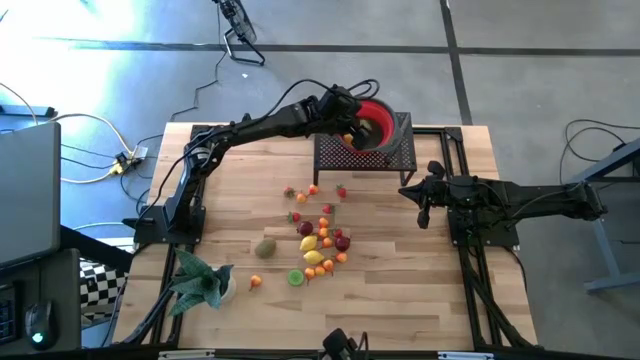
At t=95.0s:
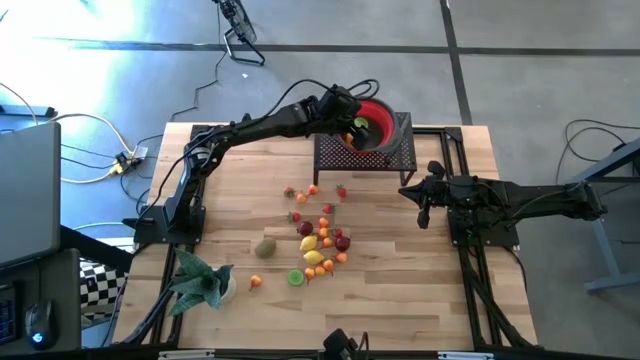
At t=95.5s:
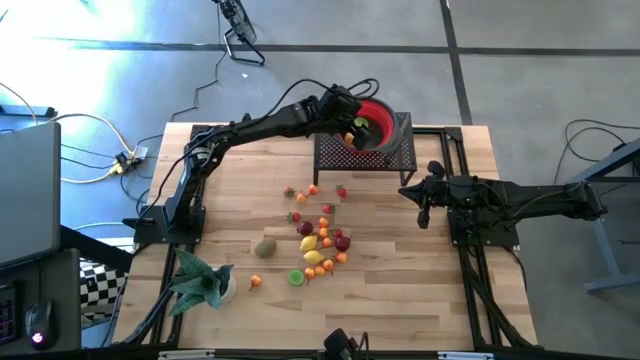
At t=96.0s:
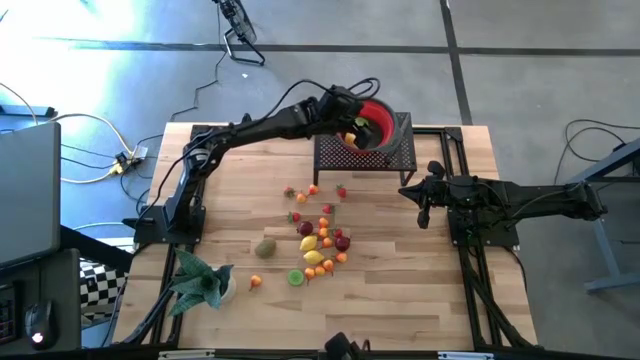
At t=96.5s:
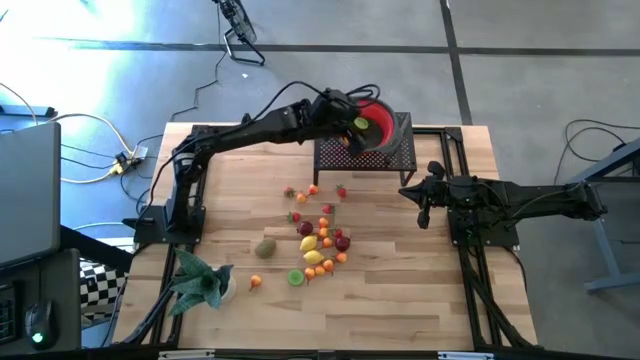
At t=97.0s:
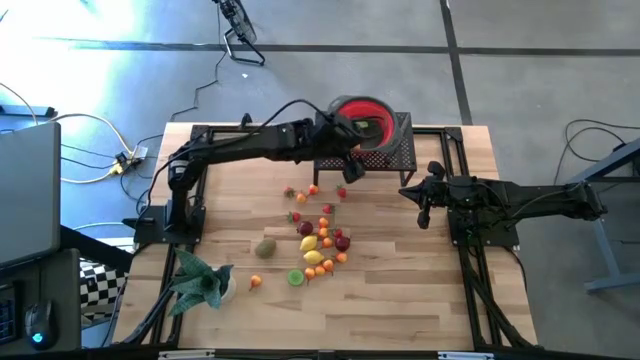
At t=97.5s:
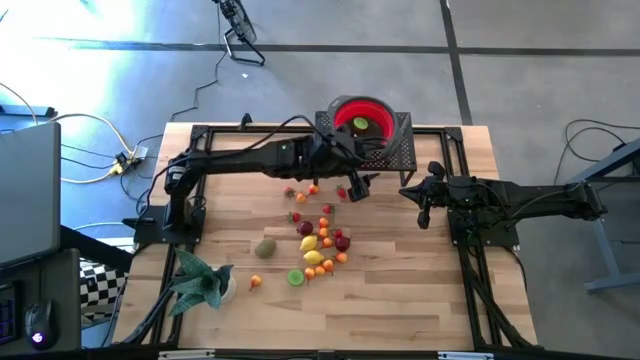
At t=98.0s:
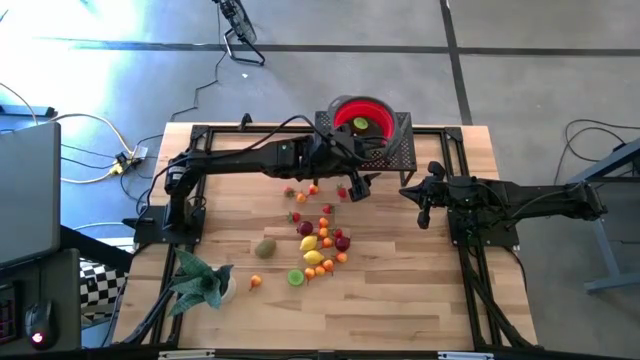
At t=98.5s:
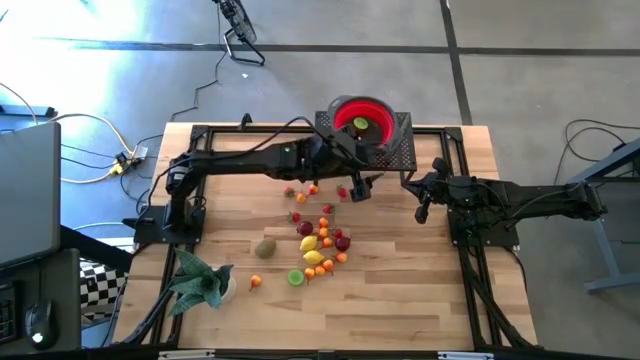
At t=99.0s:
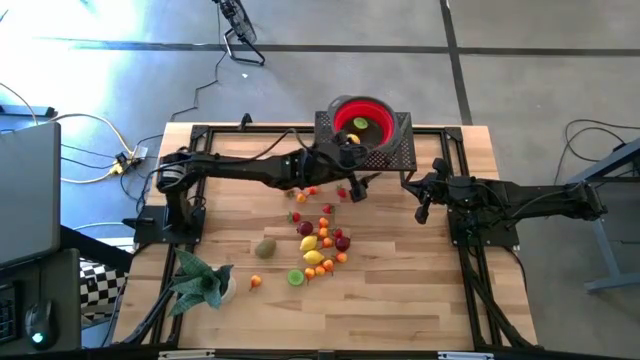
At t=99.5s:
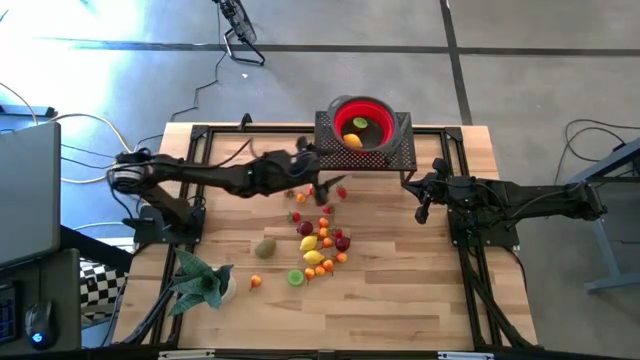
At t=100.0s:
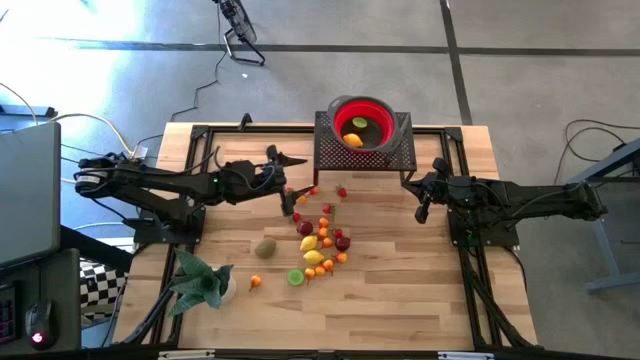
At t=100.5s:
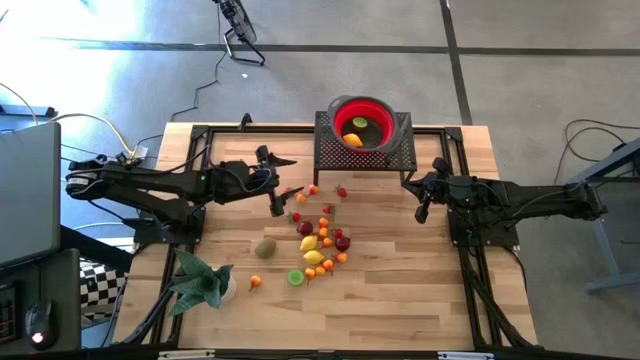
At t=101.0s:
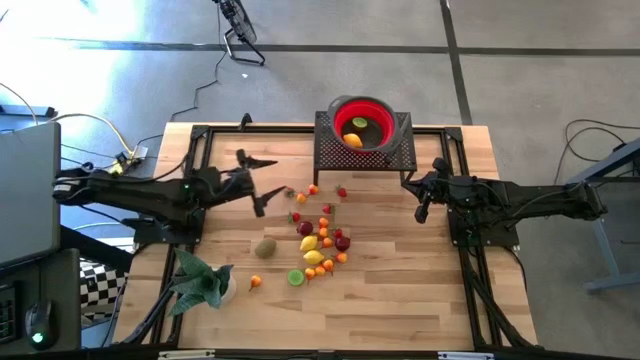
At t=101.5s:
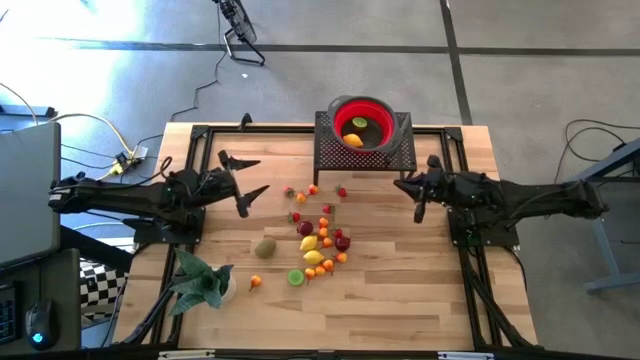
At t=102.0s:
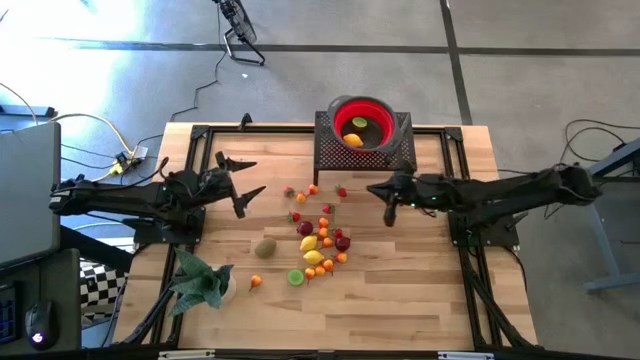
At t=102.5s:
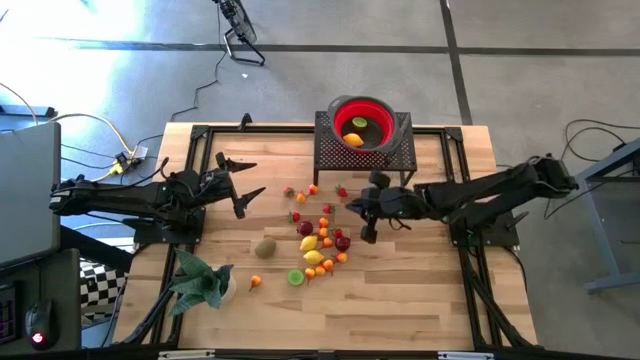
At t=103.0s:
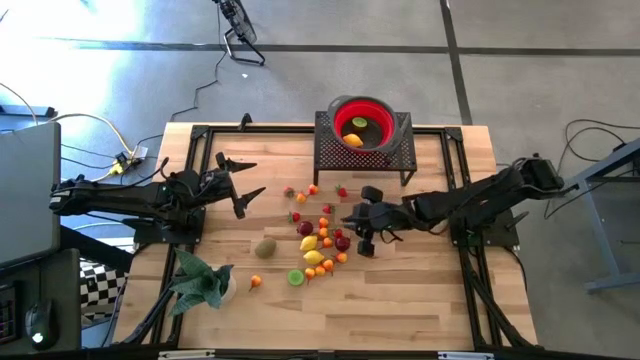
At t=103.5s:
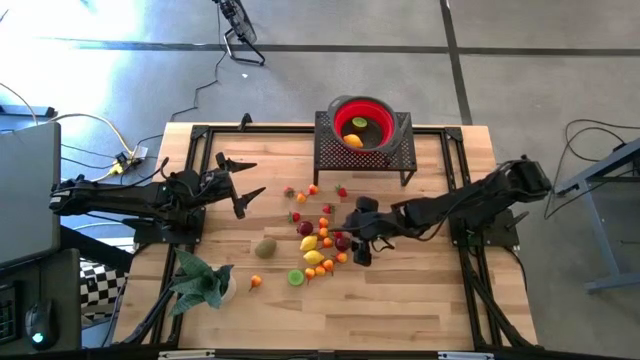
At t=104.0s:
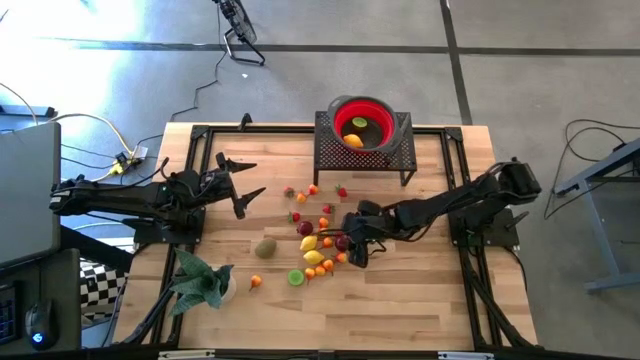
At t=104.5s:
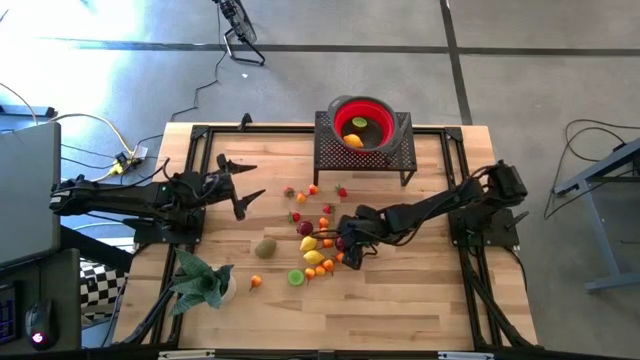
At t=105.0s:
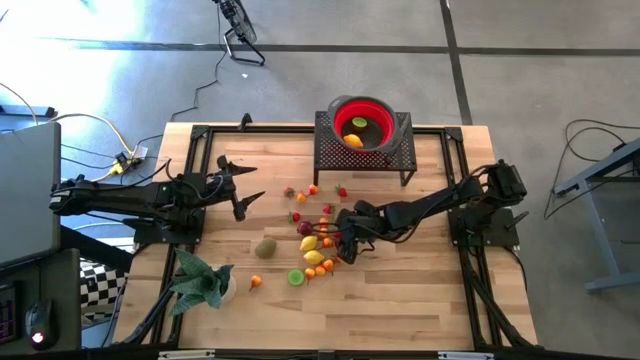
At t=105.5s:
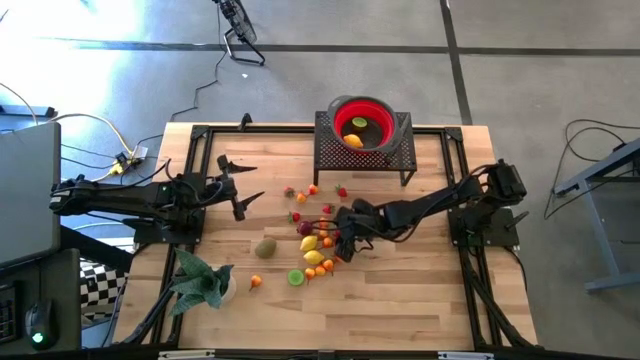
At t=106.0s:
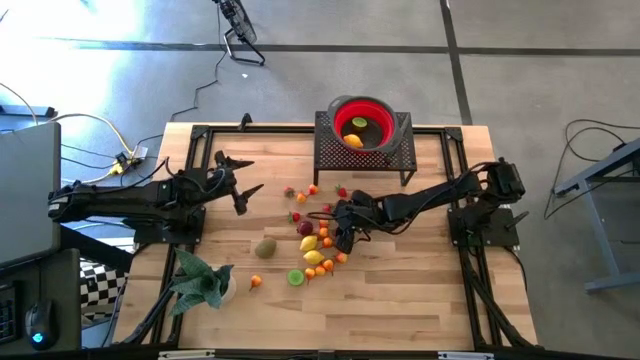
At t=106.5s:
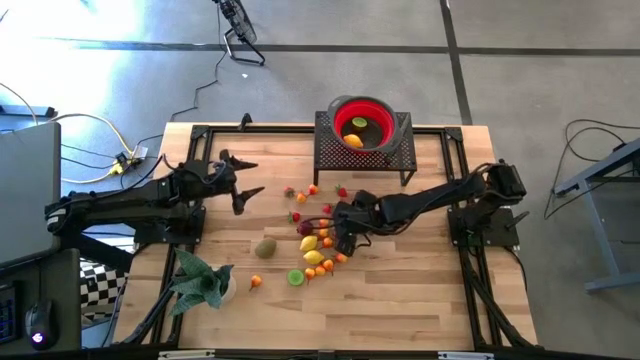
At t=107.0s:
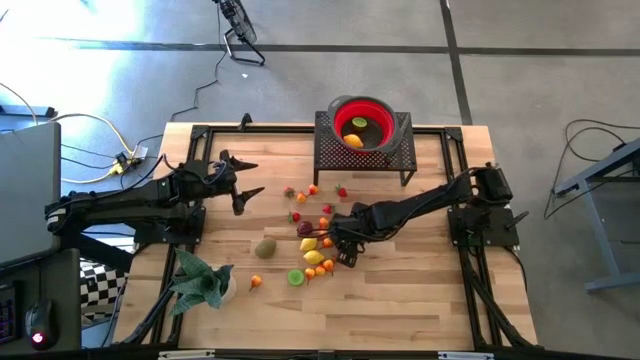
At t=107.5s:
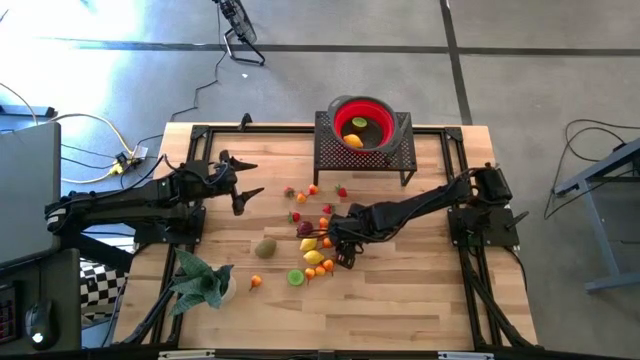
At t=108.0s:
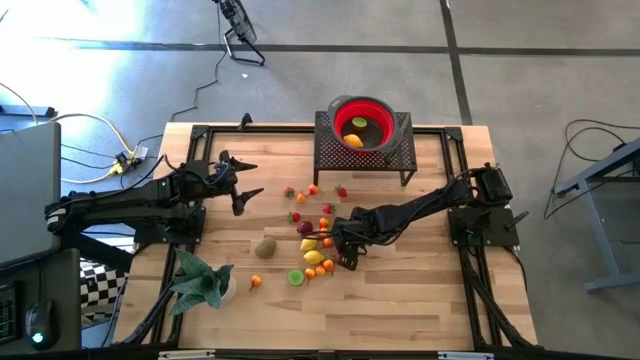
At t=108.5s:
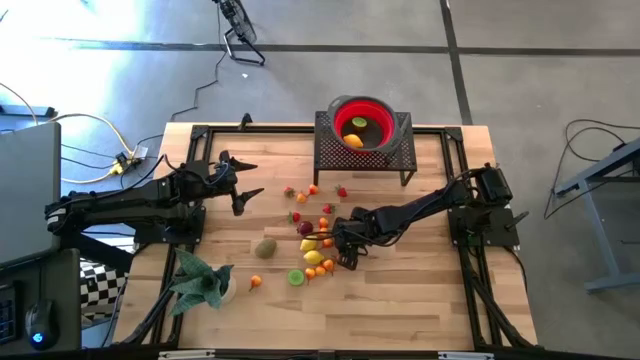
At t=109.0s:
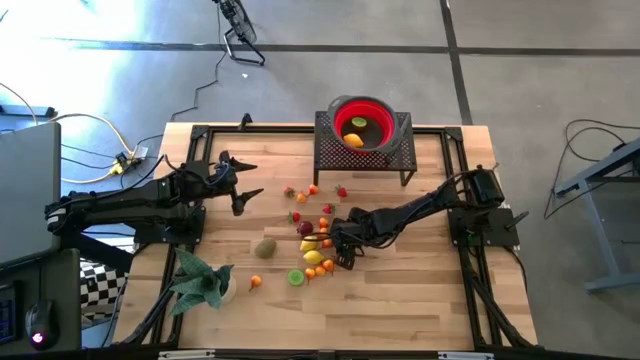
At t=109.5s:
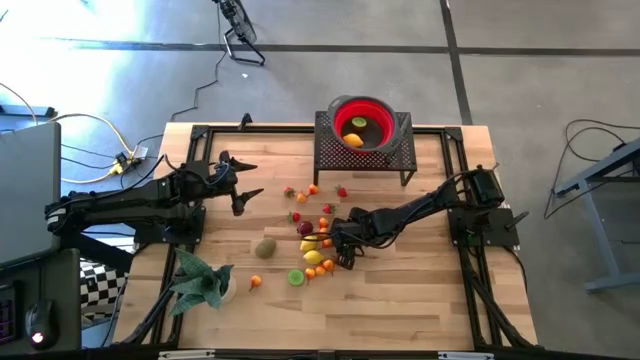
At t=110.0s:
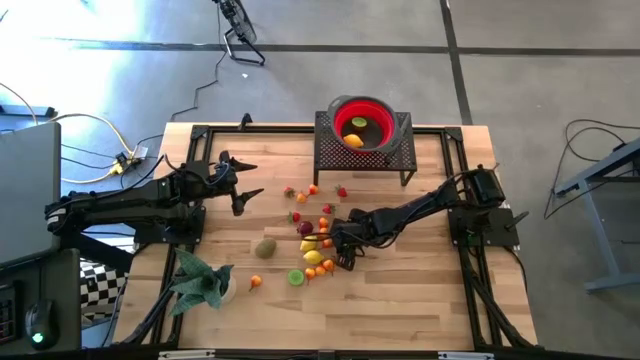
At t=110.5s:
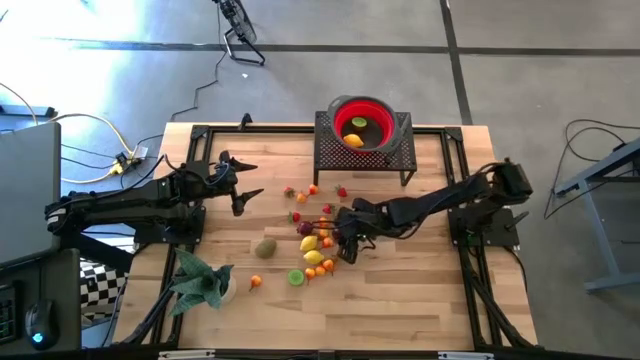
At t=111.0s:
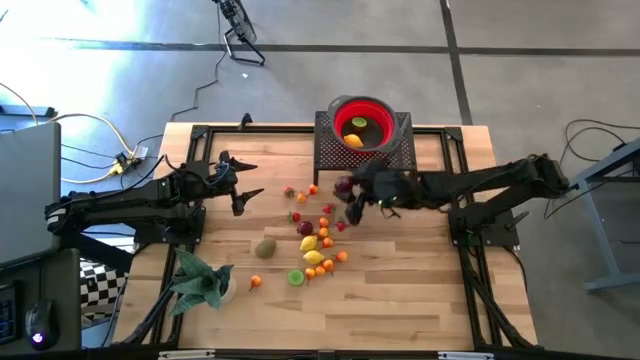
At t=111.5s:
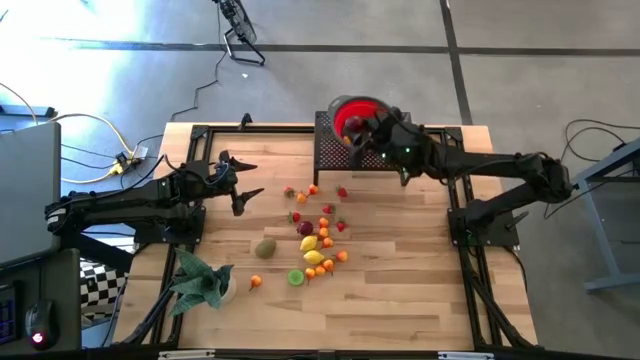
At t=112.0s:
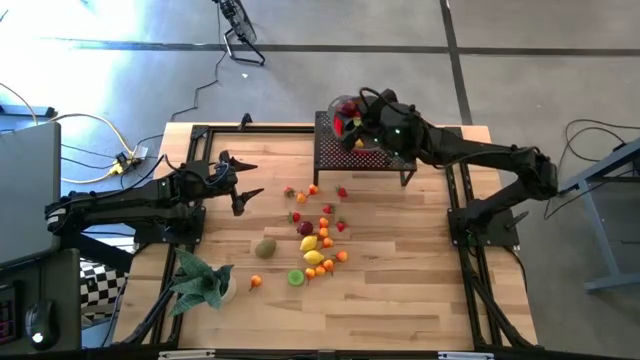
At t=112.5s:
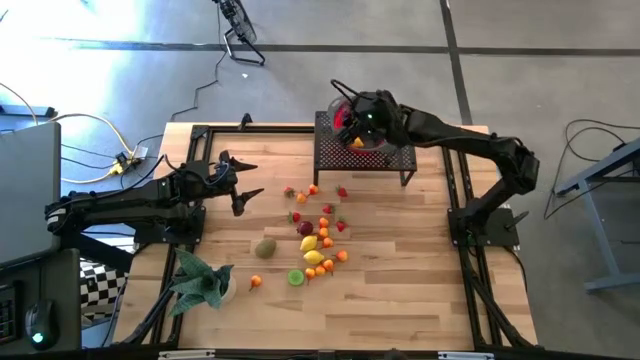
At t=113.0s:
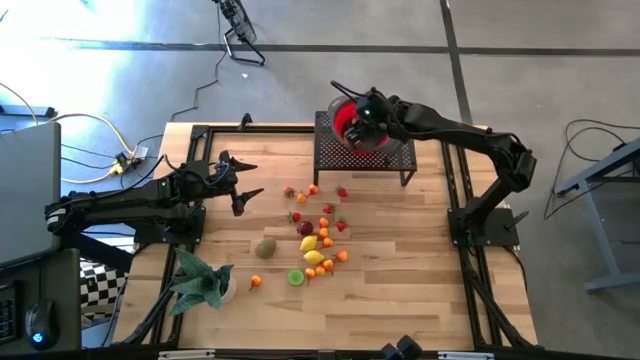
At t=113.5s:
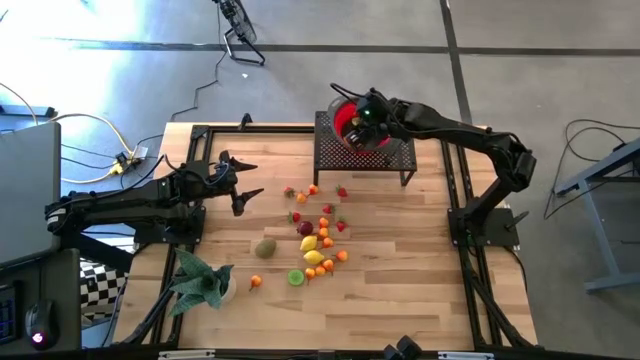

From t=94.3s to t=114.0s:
Task: Pick & Place Fruit
Put the pomegranate into the strainer on the shelf

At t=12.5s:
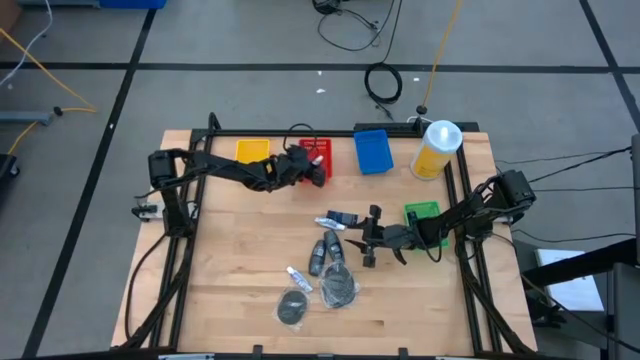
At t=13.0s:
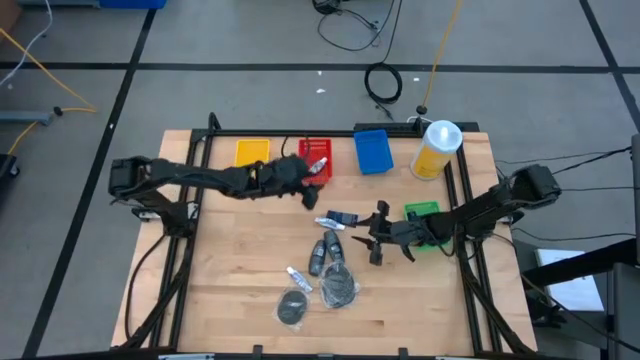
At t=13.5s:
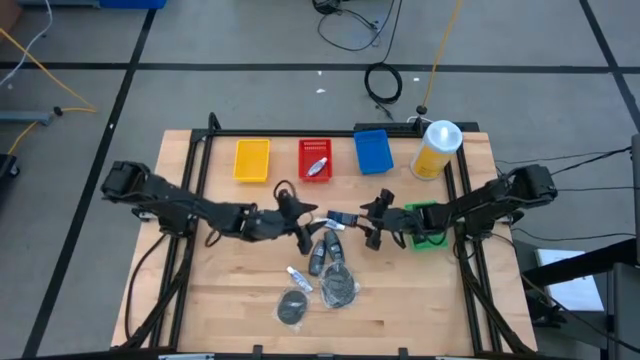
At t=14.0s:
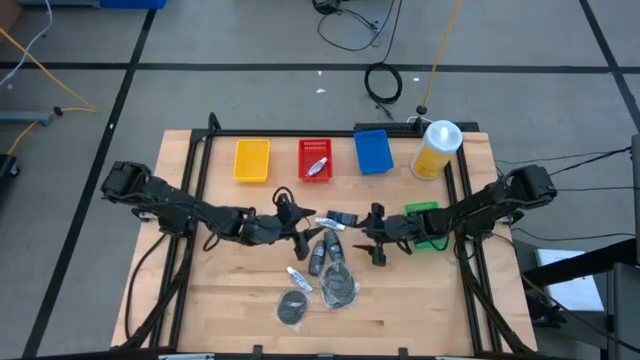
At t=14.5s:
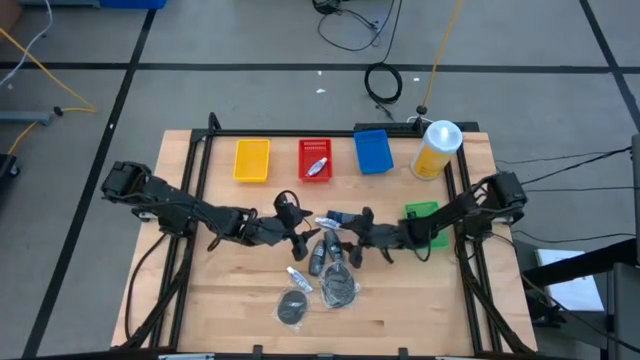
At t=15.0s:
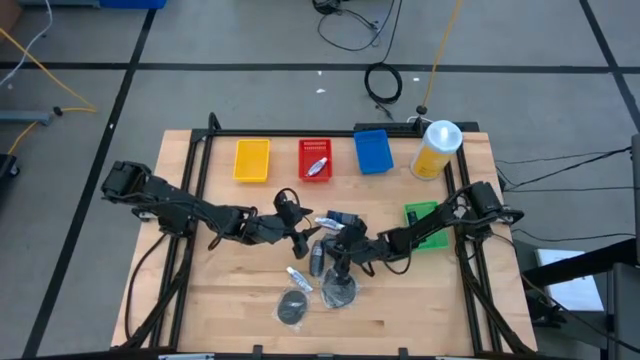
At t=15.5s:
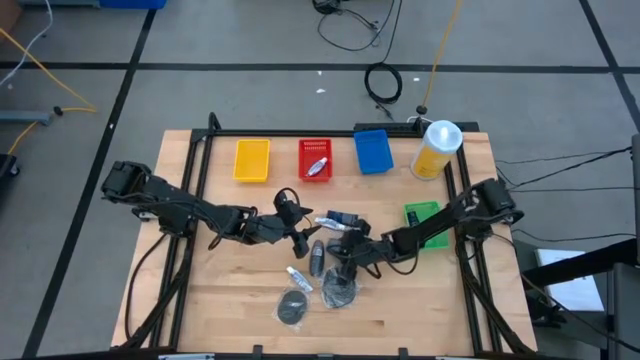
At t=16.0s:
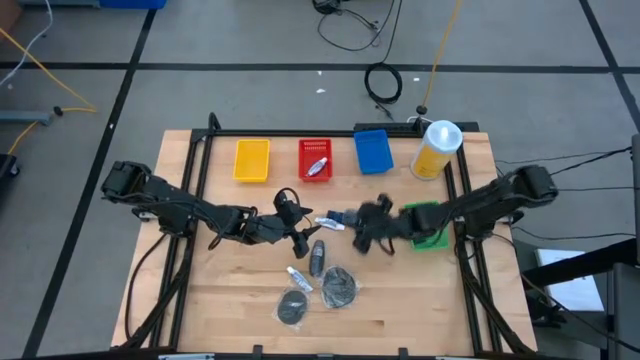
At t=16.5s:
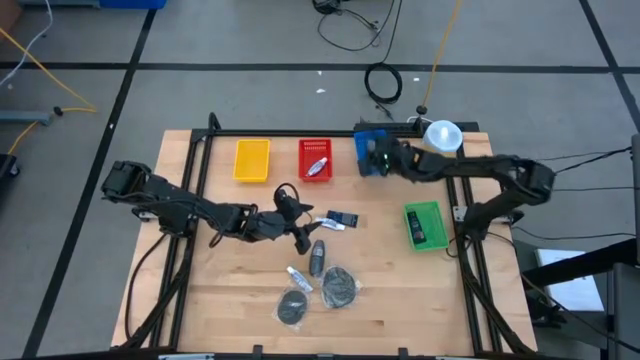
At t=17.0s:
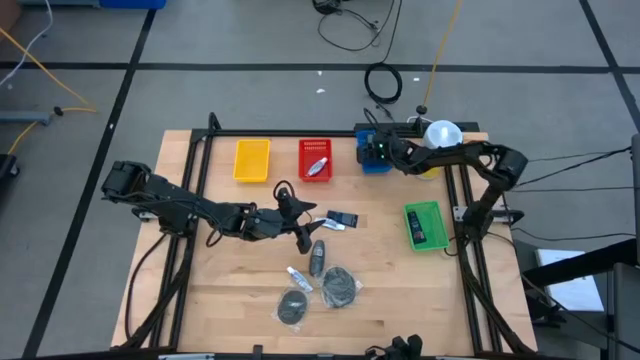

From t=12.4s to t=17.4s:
Task: Pick & Place Travel size toiletries
Put the gray deodorant into the blue bin
